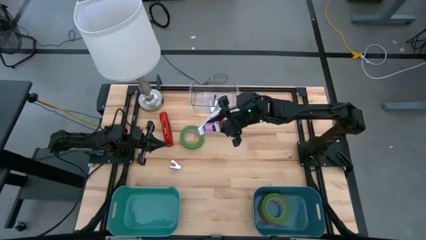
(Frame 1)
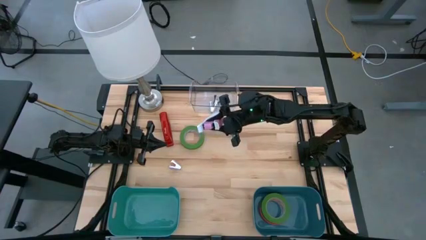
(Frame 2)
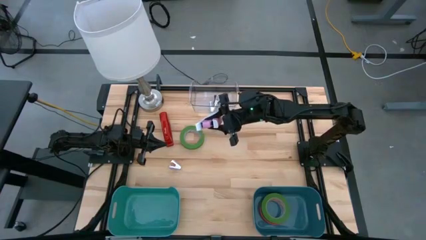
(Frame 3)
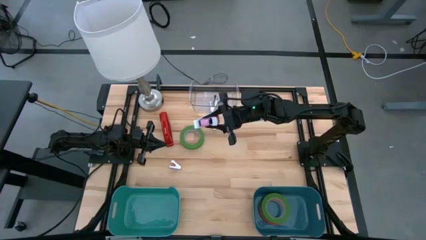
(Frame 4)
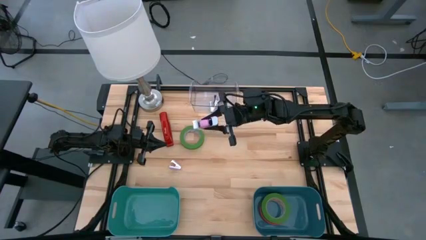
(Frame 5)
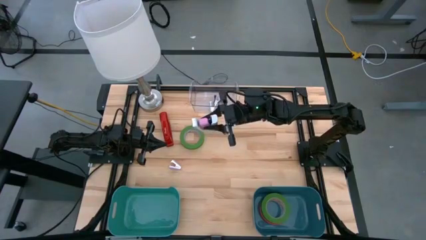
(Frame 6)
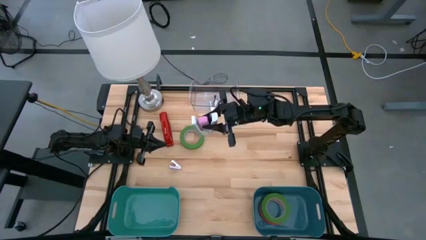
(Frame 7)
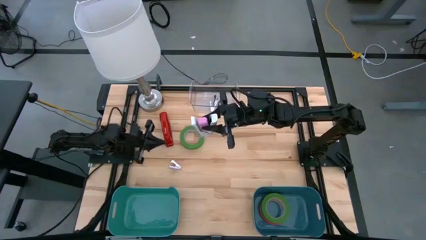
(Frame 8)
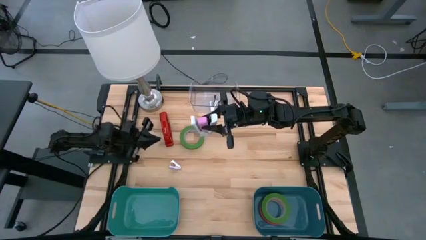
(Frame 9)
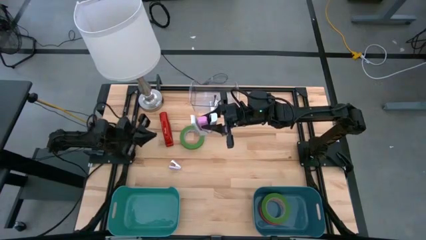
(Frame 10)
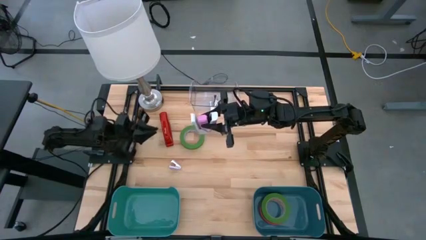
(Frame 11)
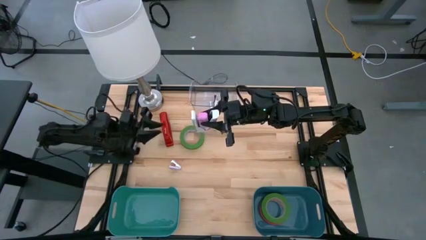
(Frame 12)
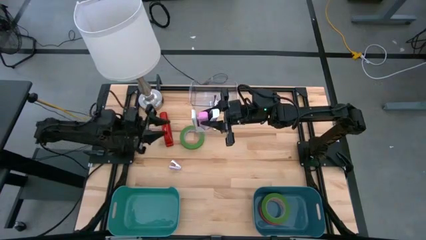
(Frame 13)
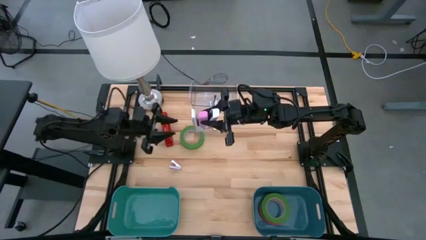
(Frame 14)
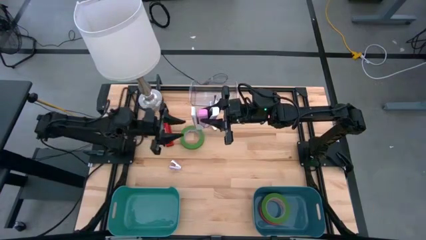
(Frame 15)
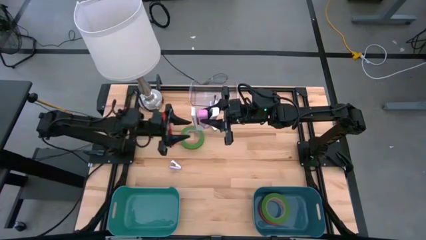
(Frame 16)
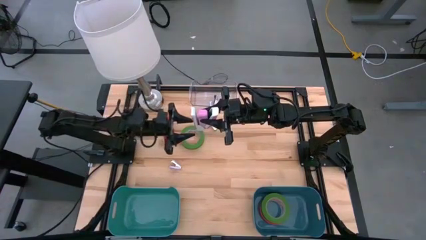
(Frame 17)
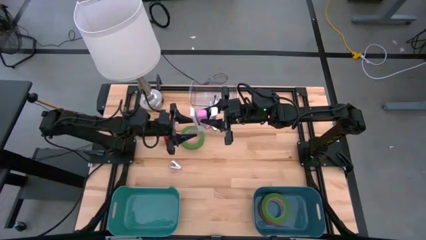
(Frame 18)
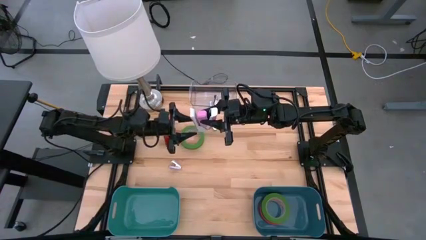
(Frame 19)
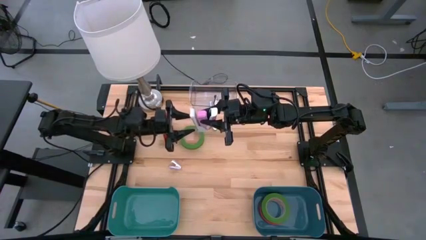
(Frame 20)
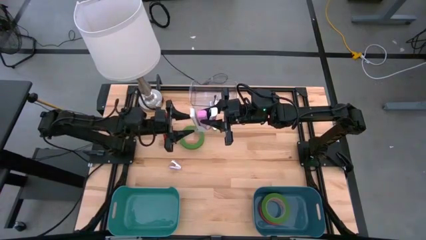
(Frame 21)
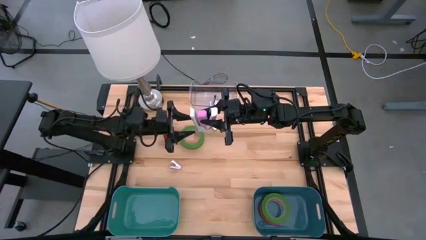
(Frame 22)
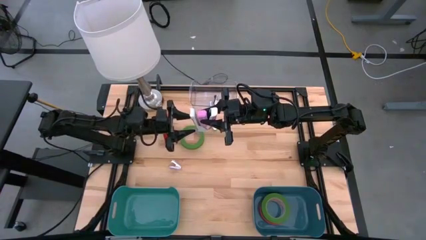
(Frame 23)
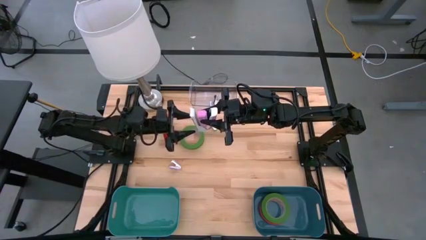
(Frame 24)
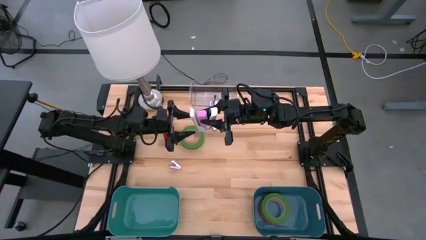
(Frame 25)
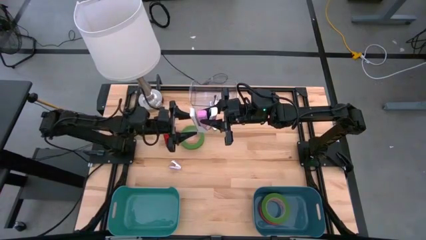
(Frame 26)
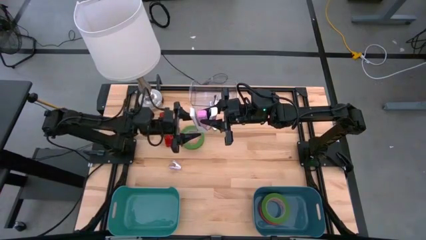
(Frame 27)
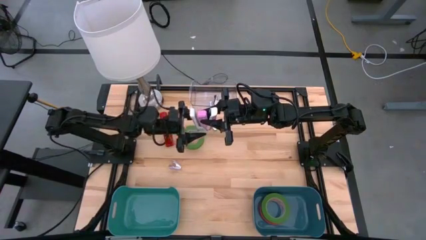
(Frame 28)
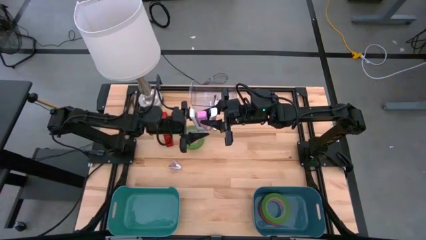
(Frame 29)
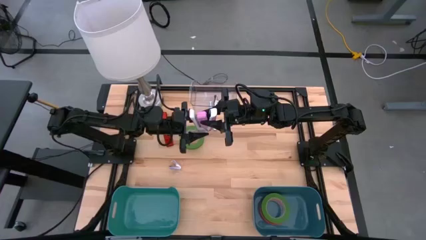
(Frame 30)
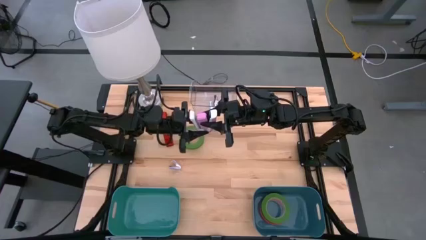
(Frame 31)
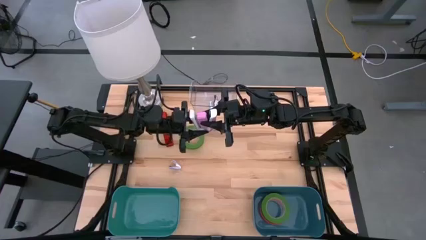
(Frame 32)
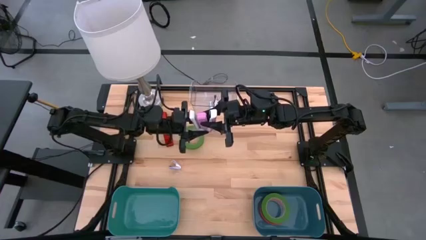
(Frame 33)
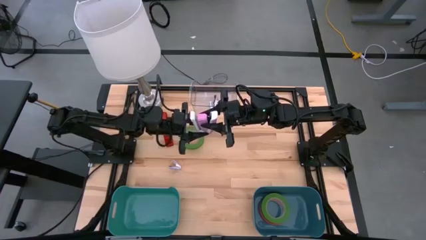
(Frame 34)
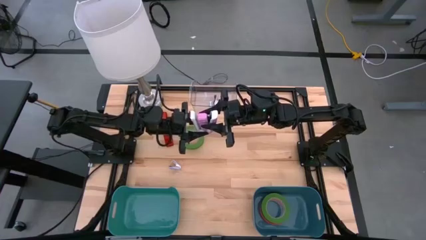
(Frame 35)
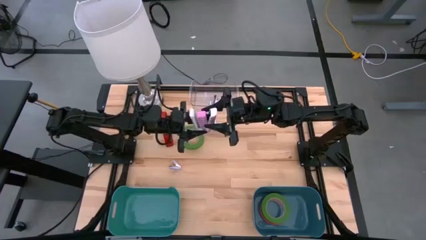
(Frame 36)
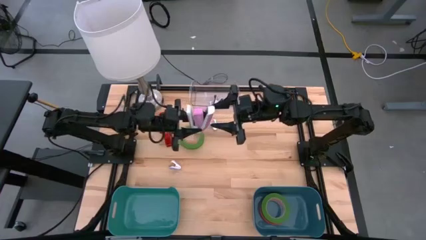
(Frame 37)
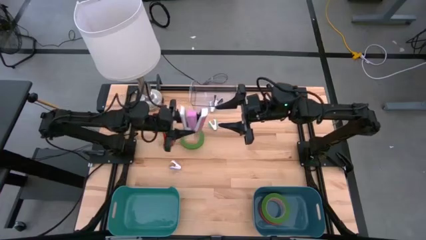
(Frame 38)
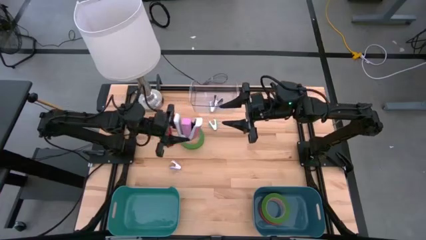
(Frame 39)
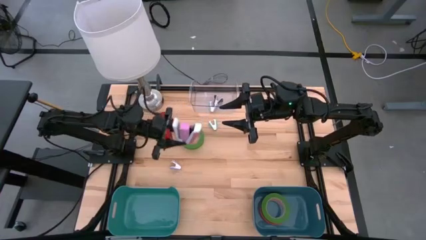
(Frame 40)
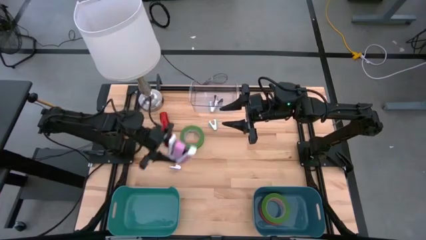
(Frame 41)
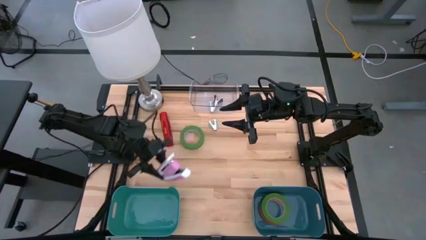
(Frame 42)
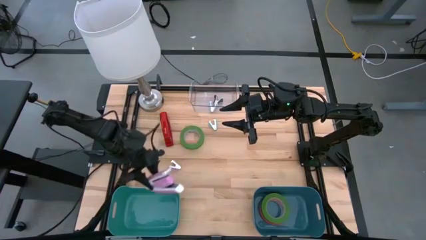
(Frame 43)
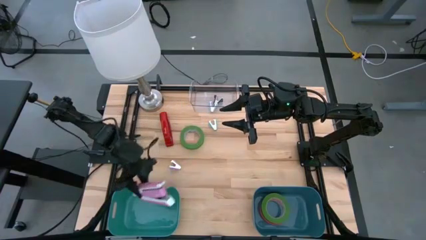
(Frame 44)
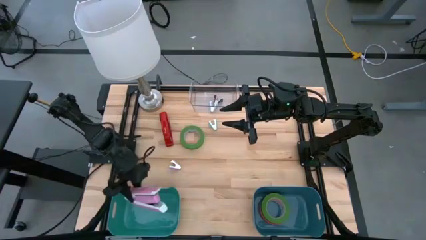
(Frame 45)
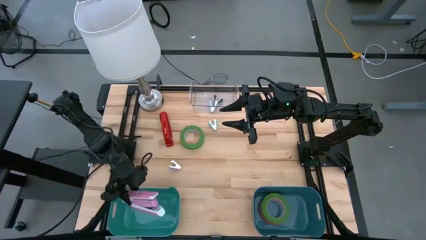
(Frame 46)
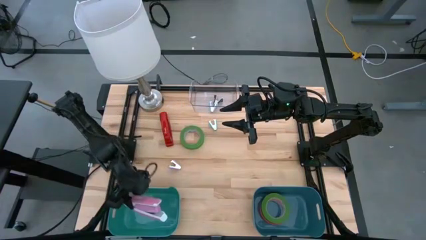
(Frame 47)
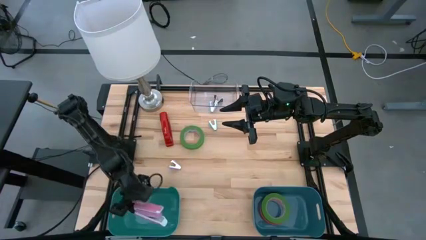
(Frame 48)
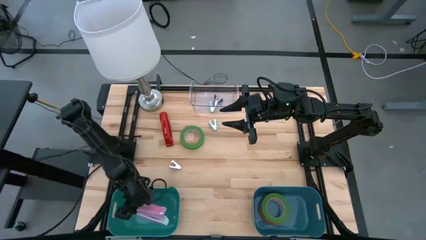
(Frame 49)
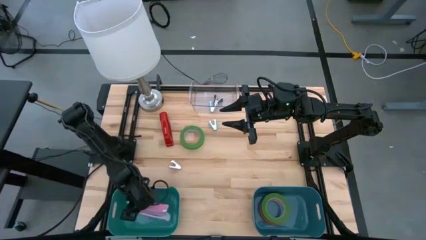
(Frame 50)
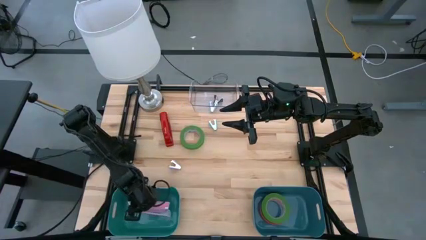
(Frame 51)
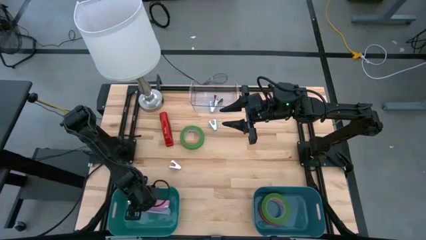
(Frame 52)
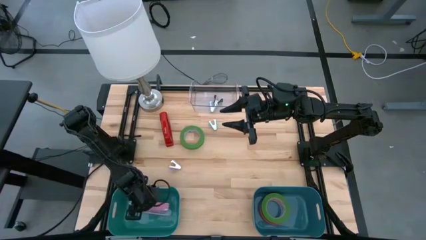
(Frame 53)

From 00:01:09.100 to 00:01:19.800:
Task: Pick and place Stapler, Stapler remover, tape
Put the pink stapler into the green bin
